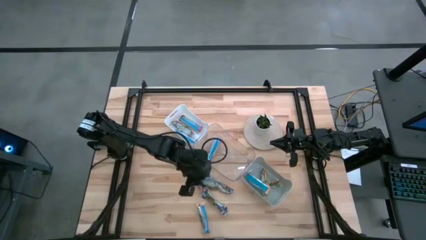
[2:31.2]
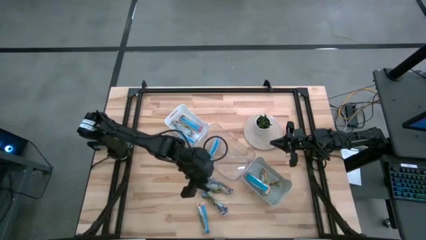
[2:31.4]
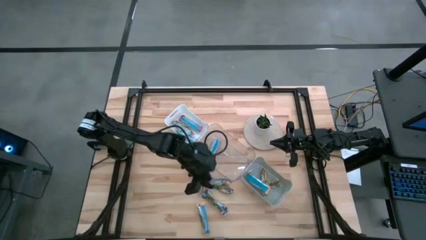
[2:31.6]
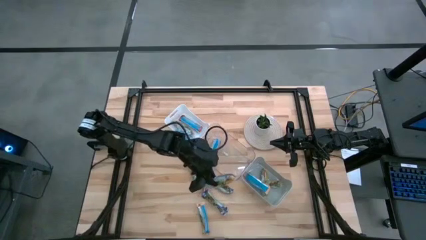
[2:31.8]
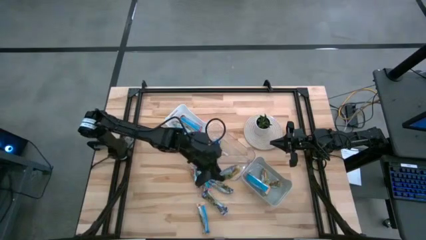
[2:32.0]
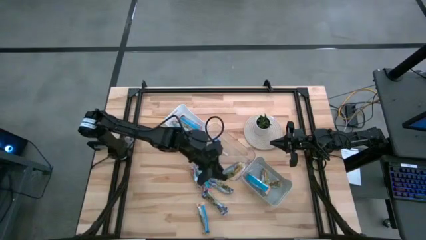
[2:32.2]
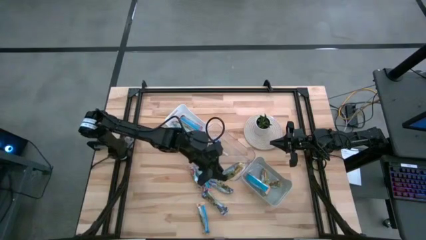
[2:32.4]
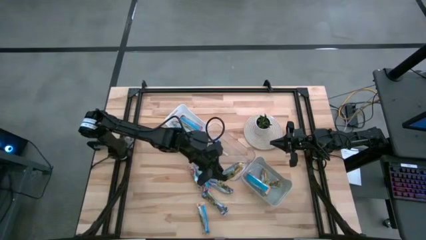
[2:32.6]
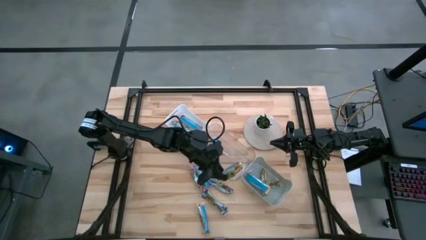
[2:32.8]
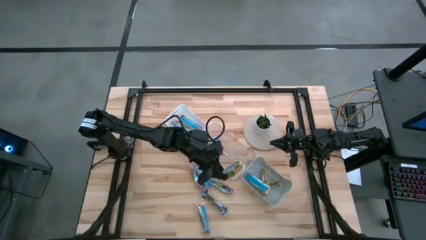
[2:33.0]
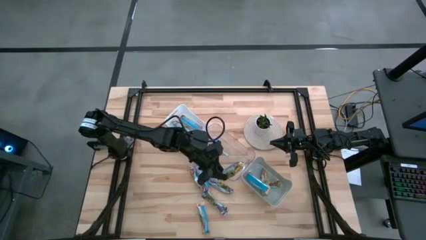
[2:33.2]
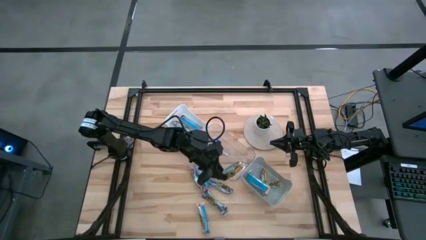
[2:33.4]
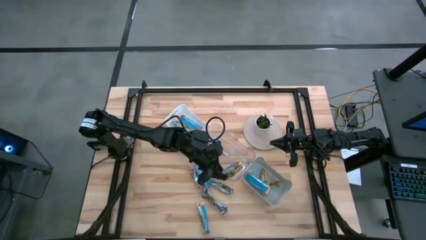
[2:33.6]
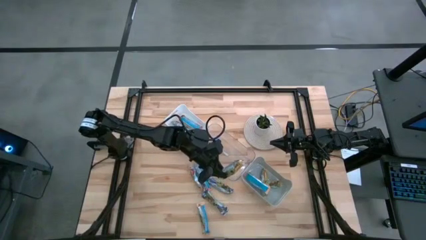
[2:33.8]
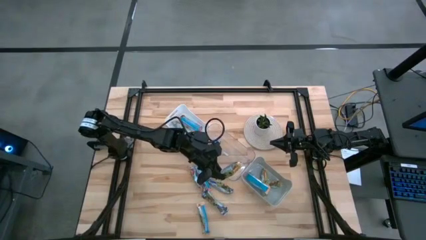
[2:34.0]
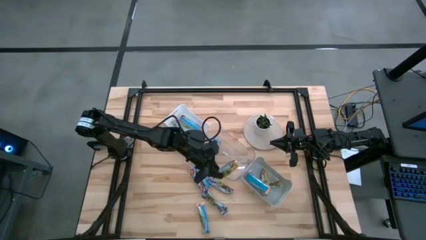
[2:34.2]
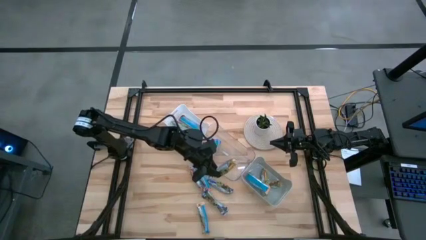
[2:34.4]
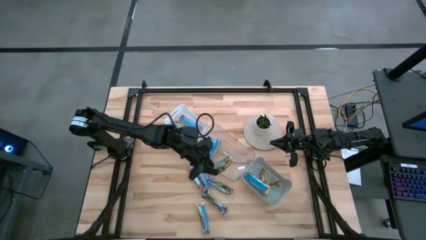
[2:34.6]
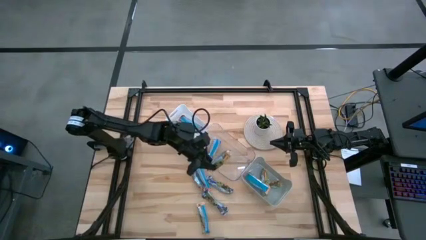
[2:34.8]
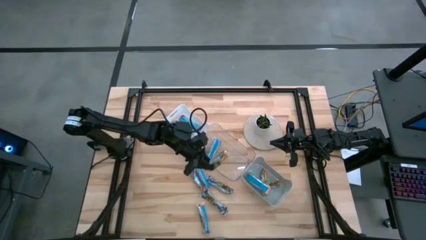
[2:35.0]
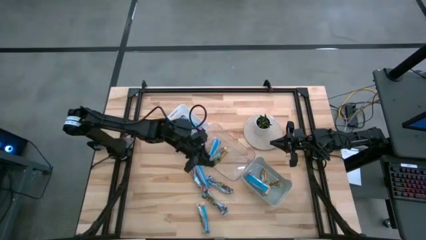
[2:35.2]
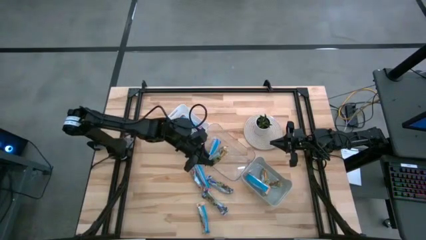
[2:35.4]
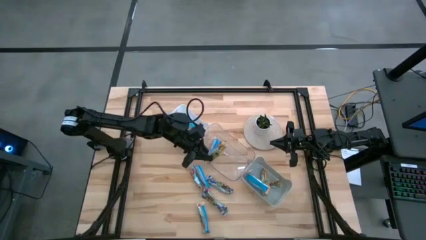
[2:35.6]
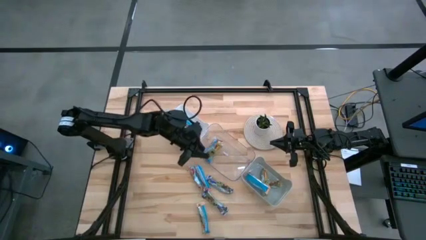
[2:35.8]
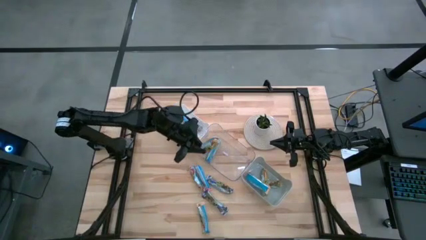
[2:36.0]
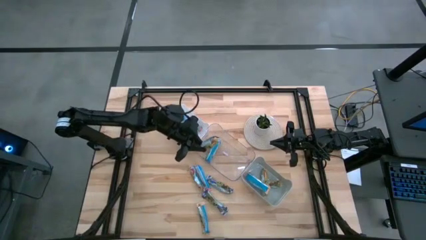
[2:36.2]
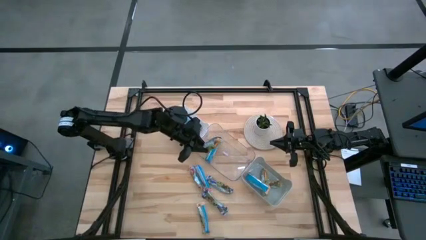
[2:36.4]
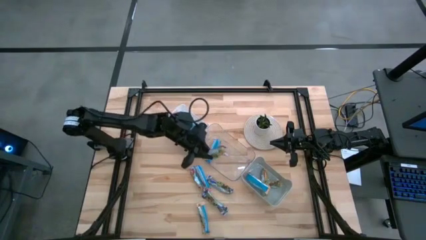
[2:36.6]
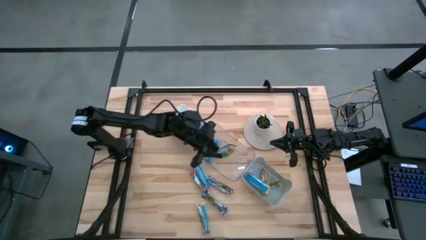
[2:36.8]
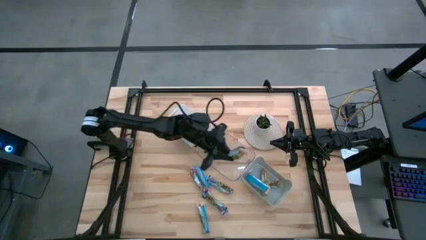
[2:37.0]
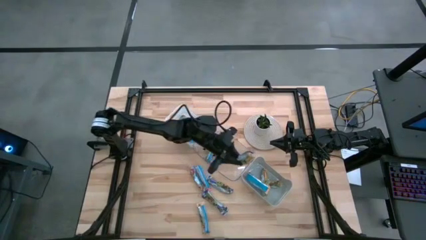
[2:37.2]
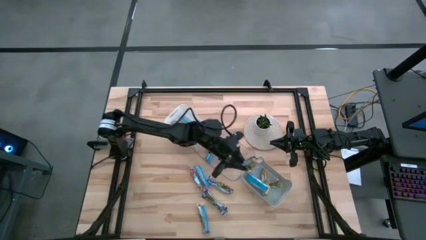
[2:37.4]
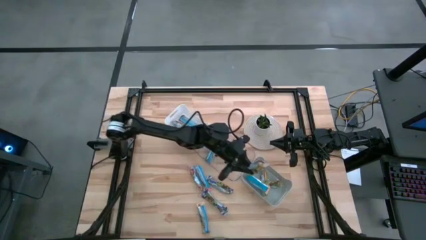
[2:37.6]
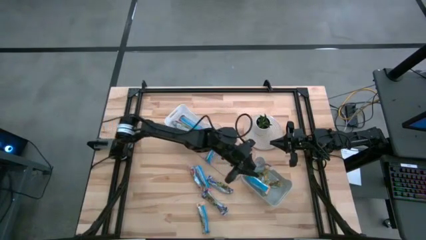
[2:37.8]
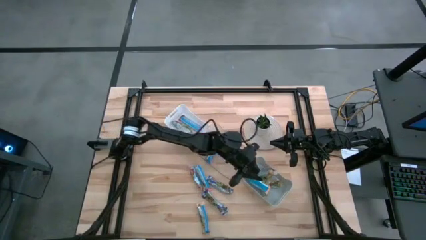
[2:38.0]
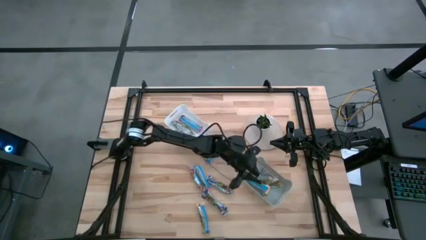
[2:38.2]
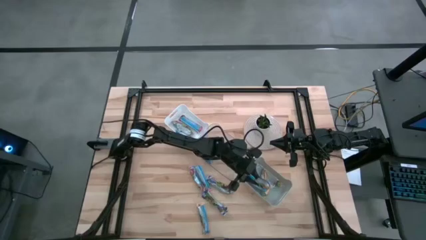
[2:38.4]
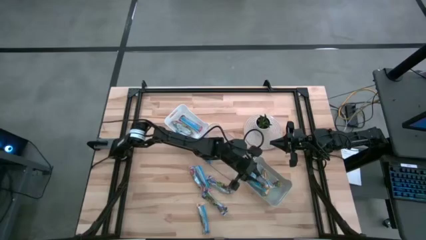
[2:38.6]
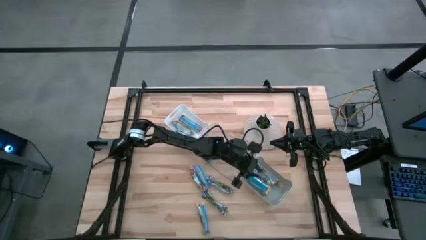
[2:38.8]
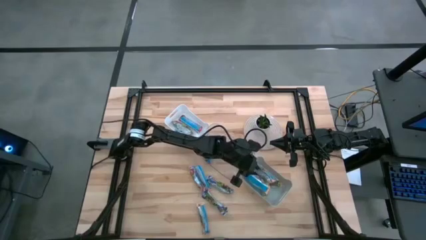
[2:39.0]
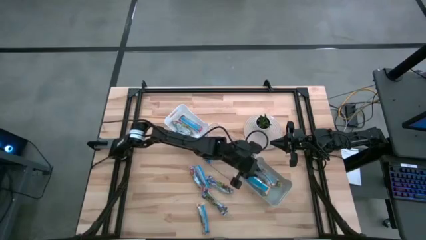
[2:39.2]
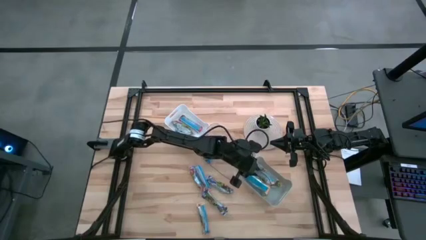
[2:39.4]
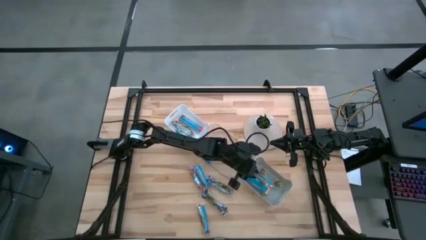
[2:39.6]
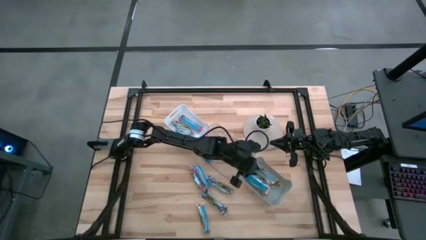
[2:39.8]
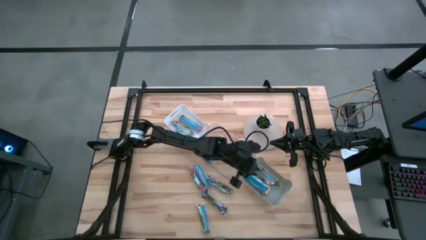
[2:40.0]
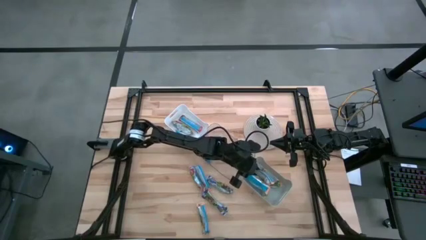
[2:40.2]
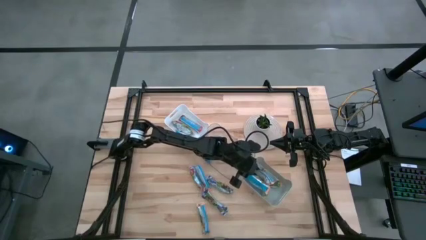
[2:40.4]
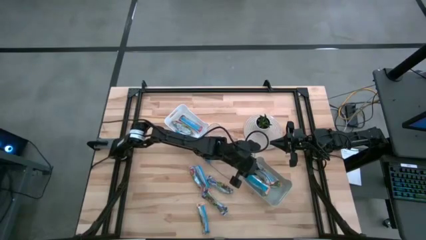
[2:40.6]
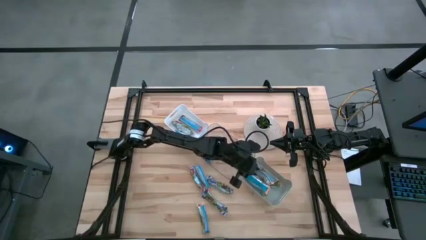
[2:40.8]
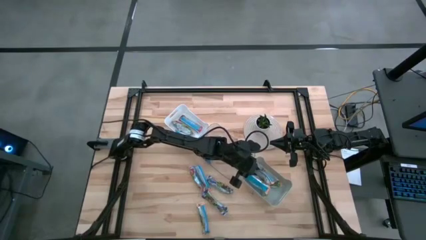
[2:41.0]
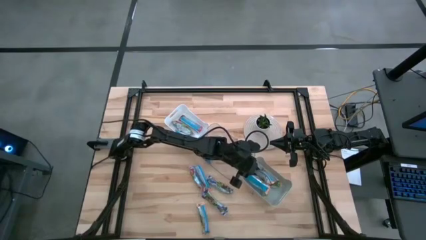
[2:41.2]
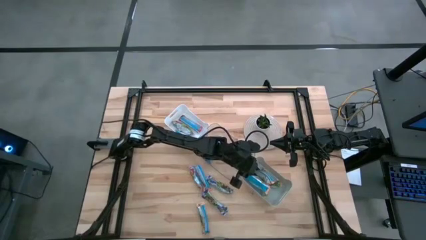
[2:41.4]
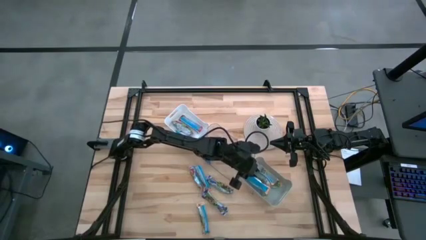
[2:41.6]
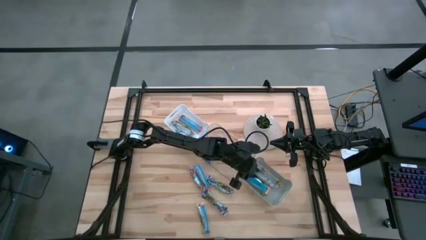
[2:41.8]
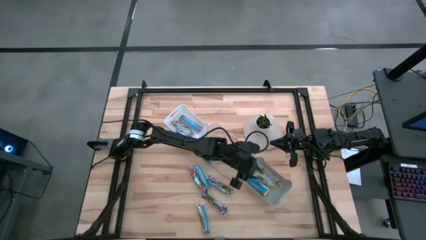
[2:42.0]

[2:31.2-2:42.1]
Task: Pick and place Granola Bars by type
Put the orange granola bar into the gray bin

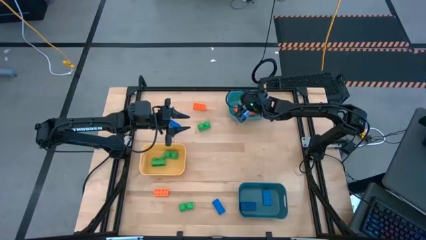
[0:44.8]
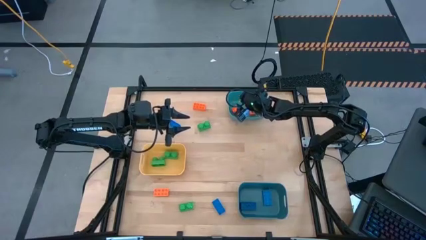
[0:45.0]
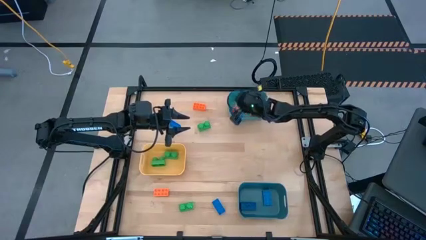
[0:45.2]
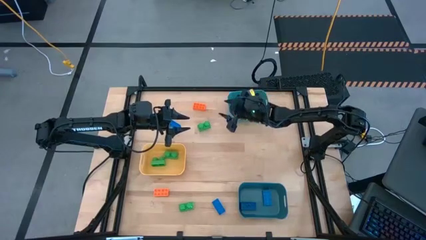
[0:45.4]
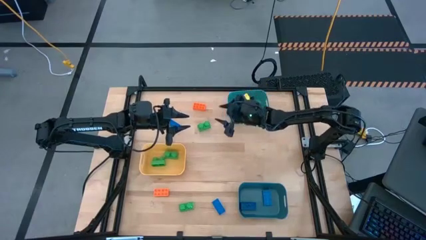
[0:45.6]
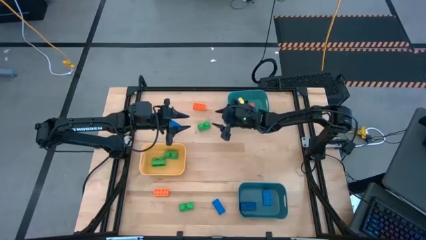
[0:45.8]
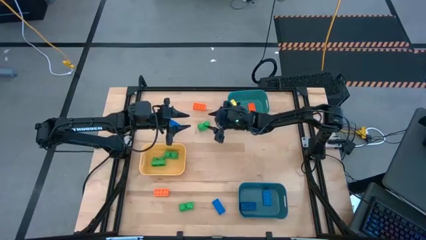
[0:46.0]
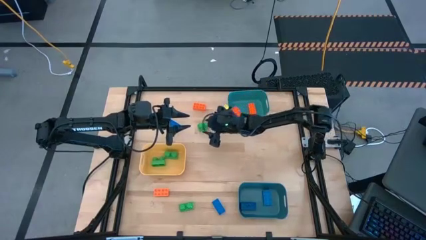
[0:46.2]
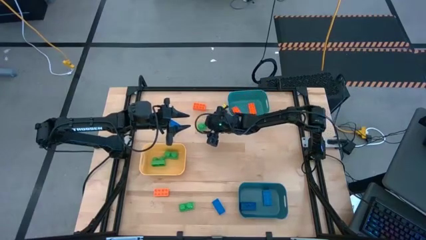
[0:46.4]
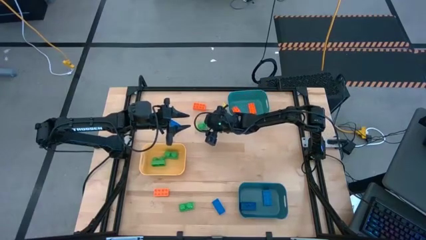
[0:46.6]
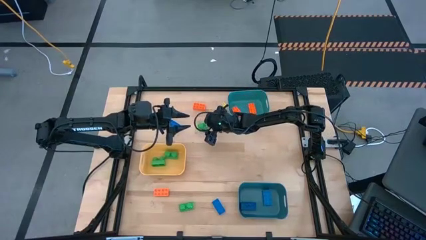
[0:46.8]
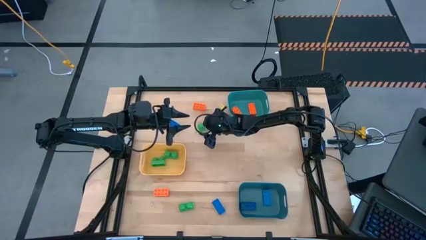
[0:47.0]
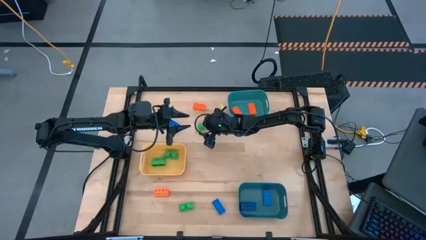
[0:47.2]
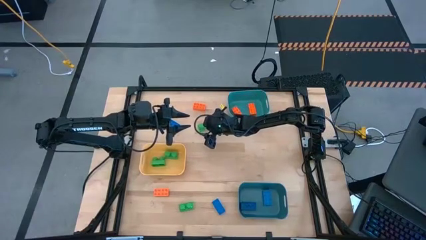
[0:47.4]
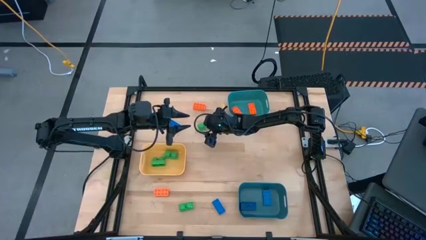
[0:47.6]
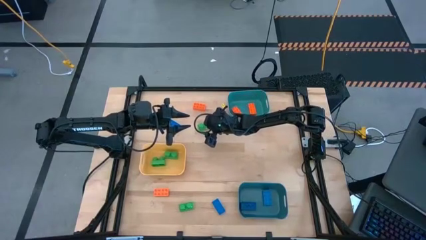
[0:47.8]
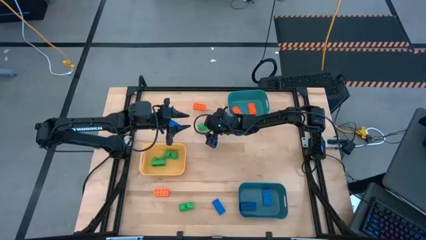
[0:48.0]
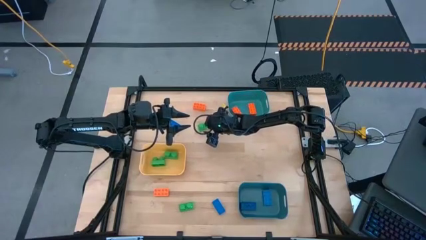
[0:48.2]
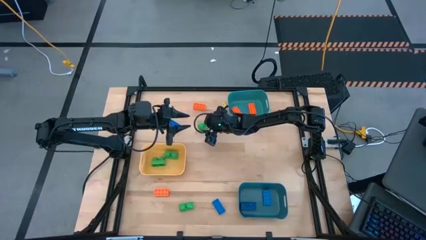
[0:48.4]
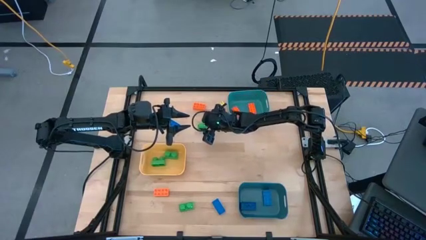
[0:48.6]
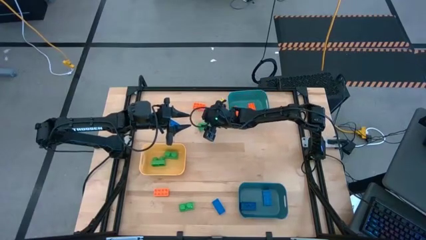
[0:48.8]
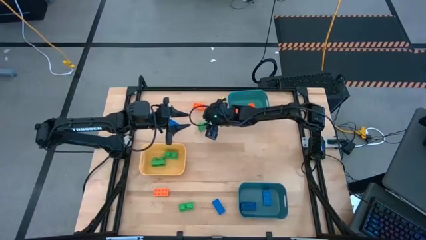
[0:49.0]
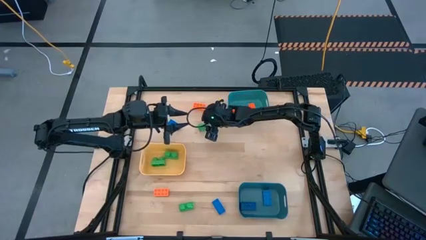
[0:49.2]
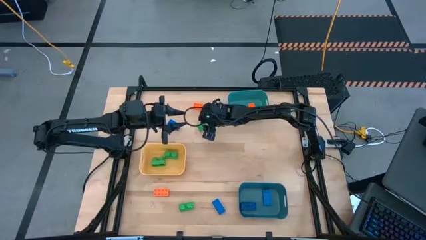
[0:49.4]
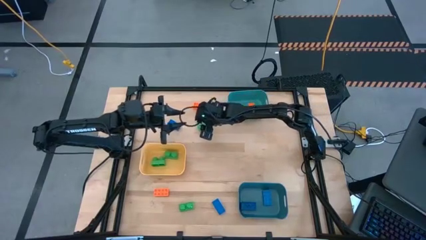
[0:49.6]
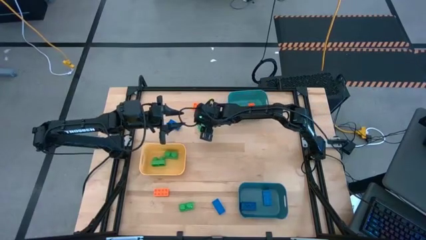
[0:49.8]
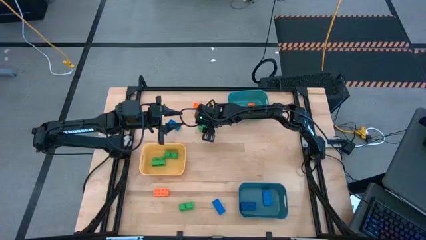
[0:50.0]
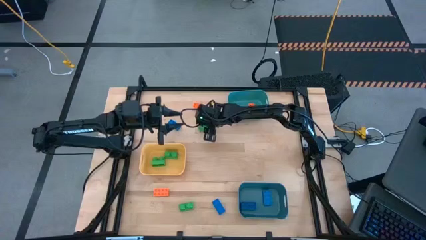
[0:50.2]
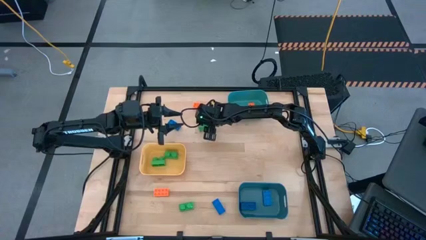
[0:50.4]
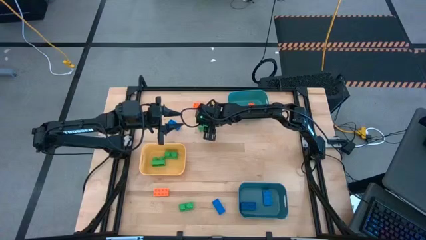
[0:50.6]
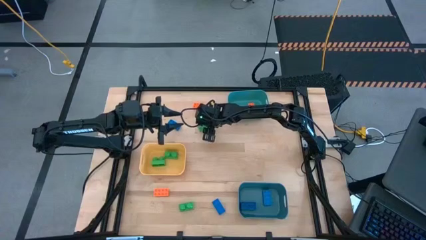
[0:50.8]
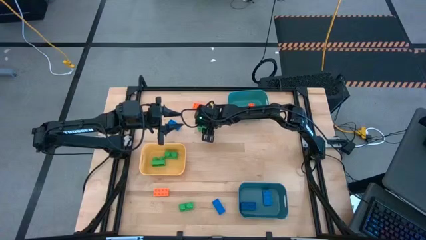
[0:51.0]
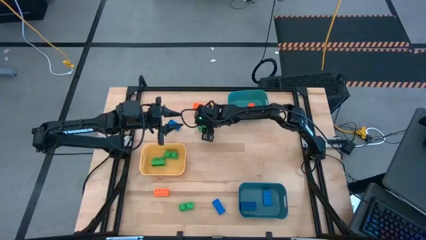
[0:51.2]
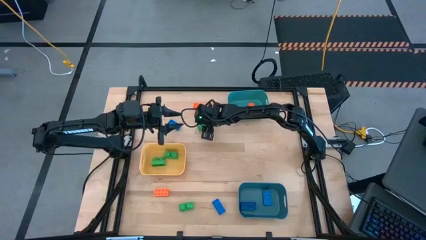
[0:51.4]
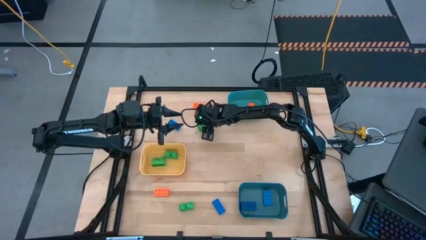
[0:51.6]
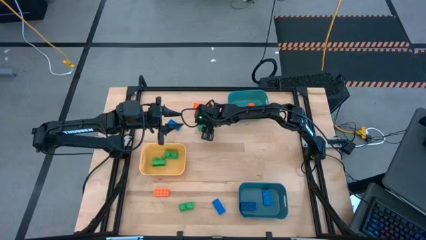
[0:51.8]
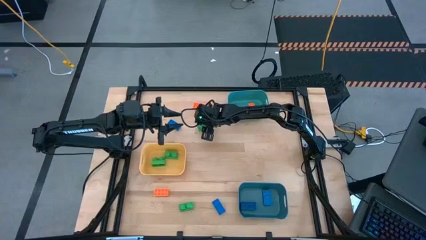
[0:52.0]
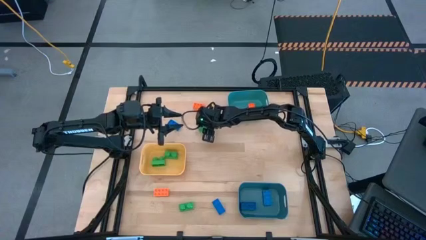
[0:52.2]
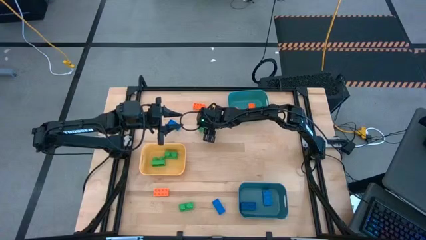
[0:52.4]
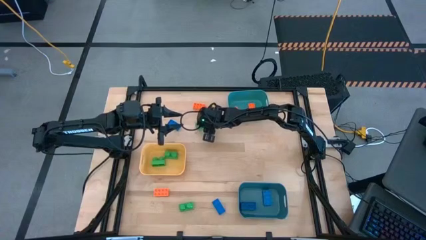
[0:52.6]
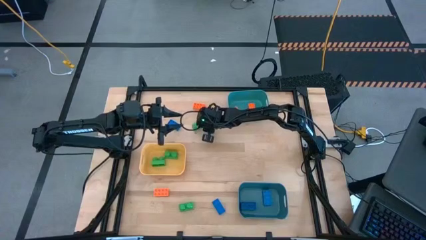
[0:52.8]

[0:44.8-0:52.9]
Task: Sort & place blocks by color
Put the green game piece into the yellow bin
